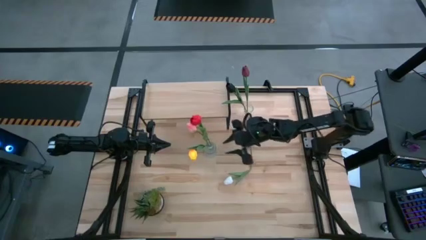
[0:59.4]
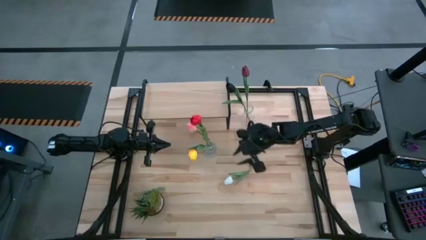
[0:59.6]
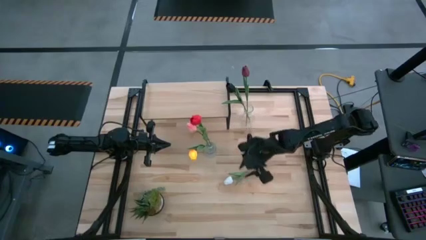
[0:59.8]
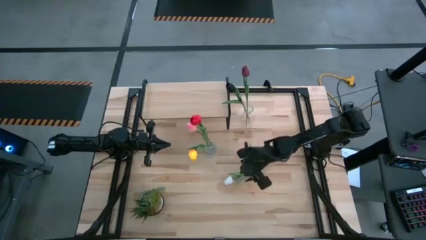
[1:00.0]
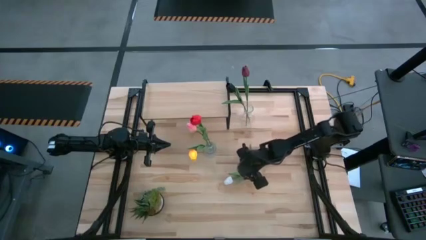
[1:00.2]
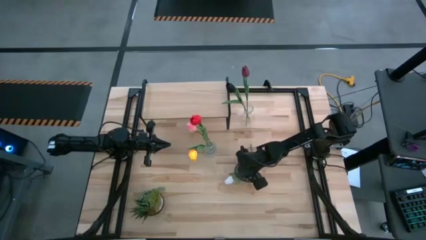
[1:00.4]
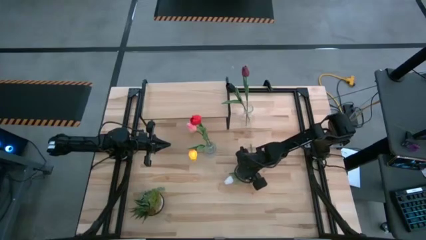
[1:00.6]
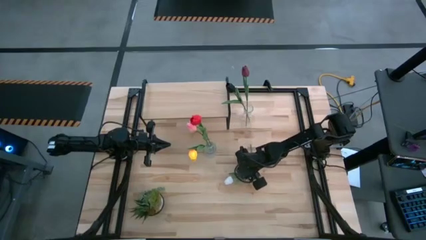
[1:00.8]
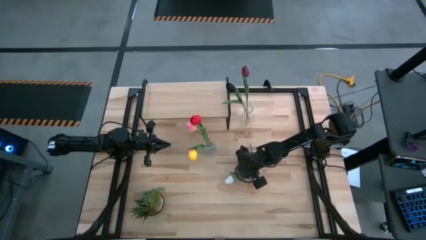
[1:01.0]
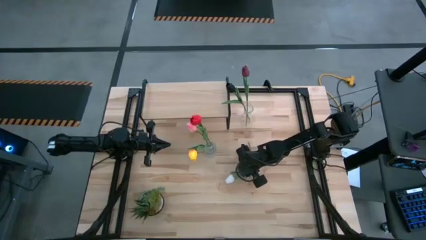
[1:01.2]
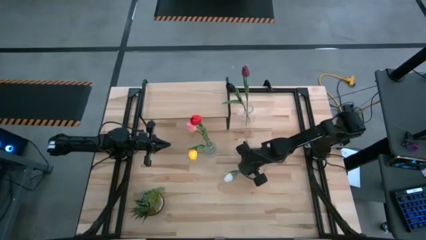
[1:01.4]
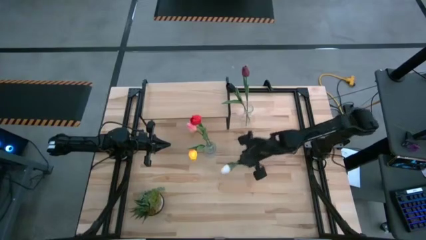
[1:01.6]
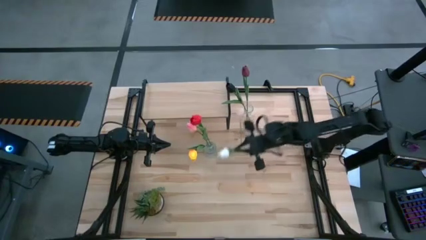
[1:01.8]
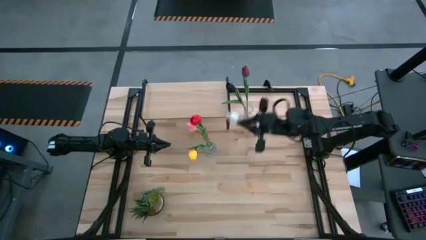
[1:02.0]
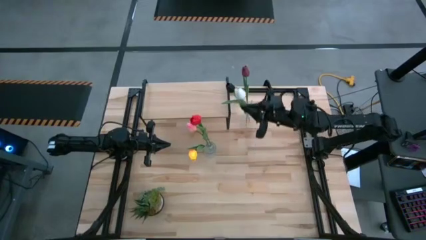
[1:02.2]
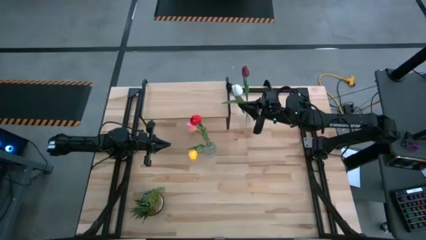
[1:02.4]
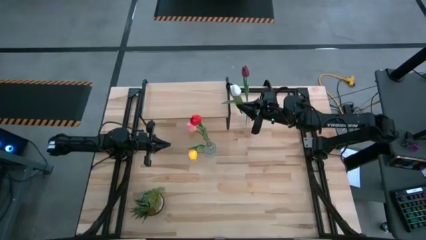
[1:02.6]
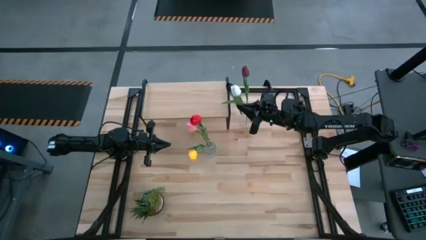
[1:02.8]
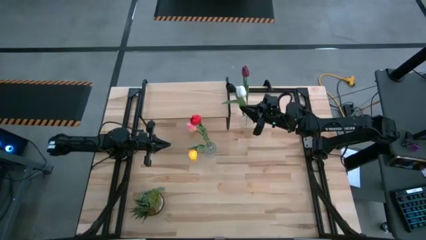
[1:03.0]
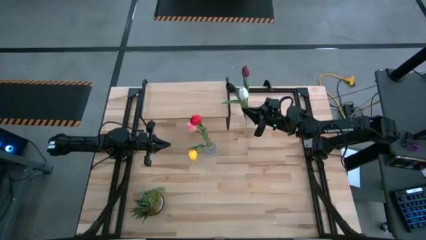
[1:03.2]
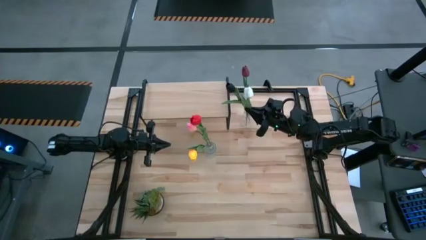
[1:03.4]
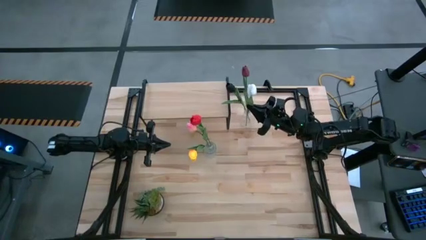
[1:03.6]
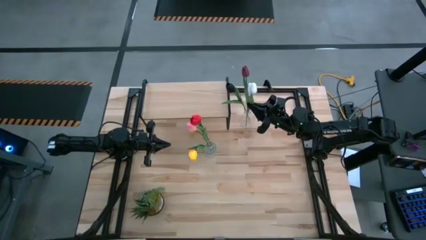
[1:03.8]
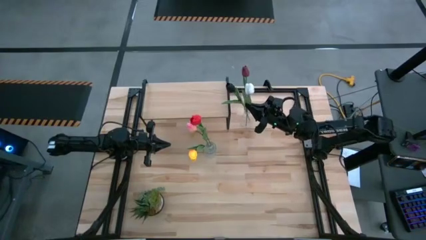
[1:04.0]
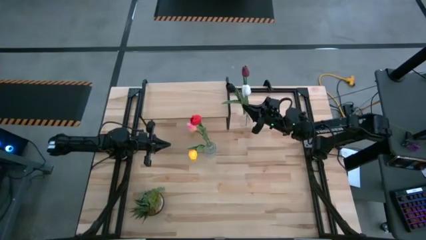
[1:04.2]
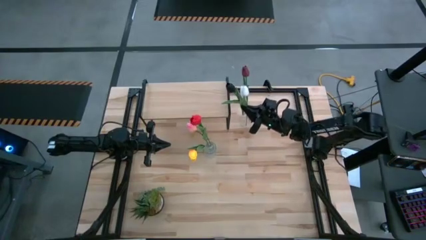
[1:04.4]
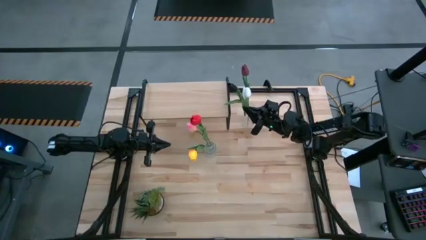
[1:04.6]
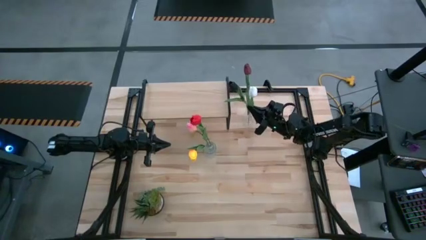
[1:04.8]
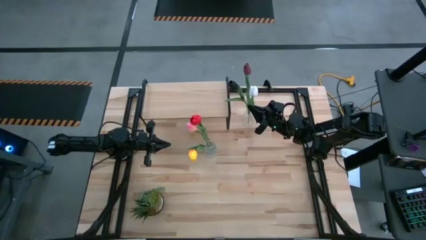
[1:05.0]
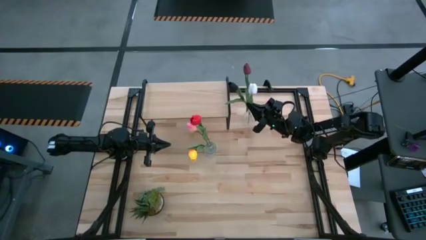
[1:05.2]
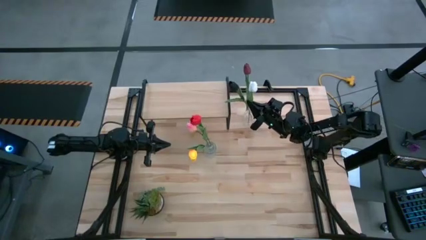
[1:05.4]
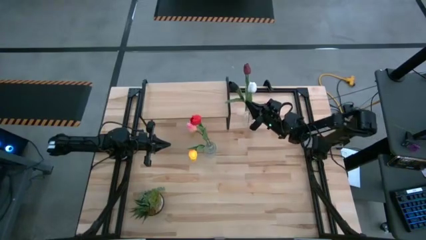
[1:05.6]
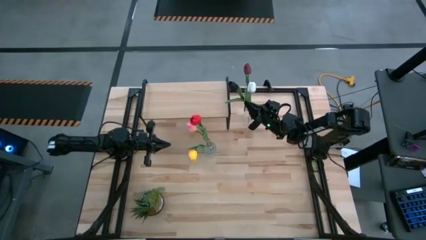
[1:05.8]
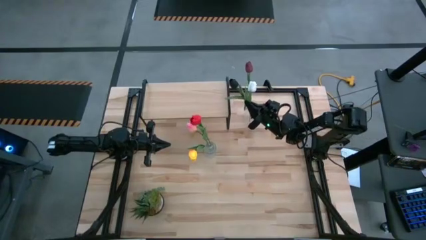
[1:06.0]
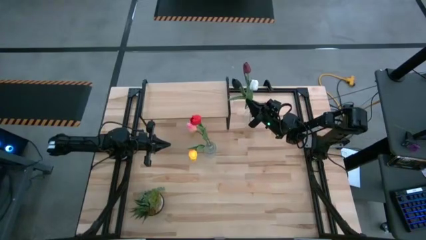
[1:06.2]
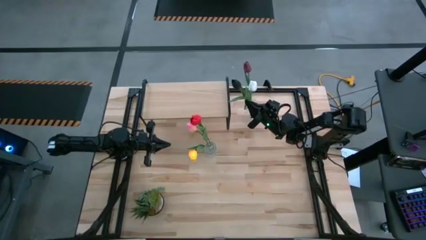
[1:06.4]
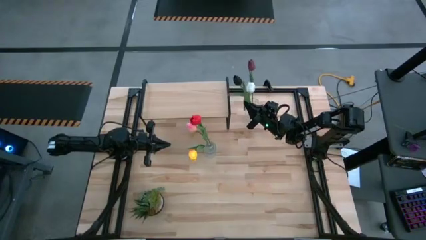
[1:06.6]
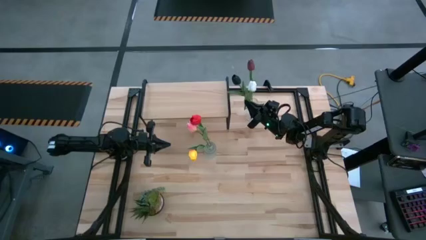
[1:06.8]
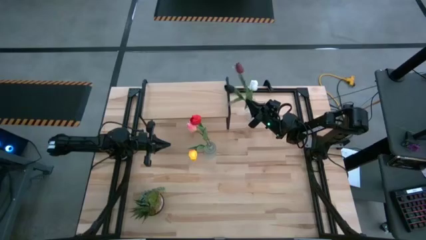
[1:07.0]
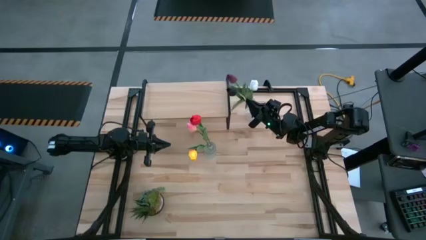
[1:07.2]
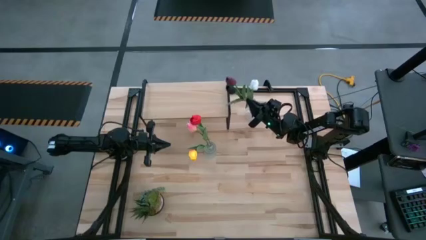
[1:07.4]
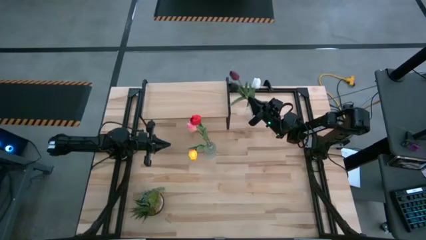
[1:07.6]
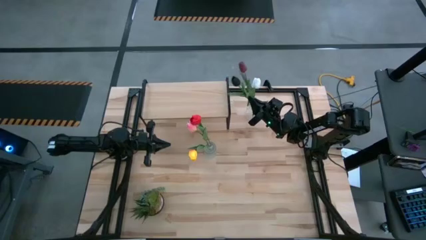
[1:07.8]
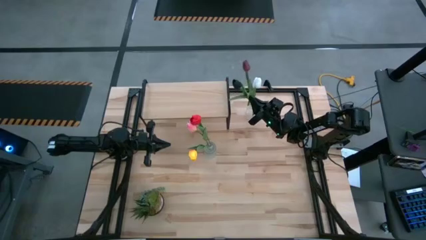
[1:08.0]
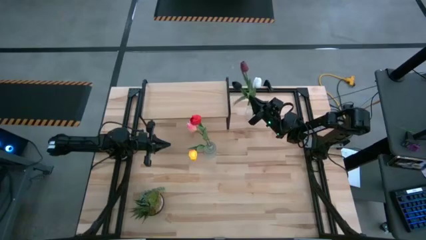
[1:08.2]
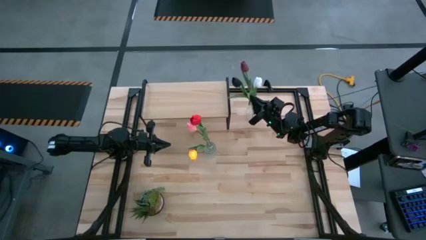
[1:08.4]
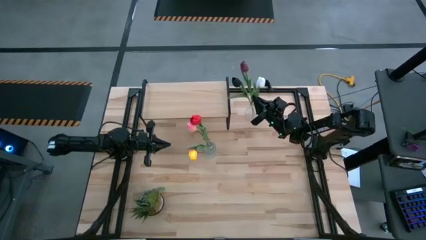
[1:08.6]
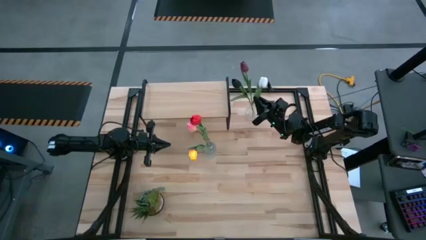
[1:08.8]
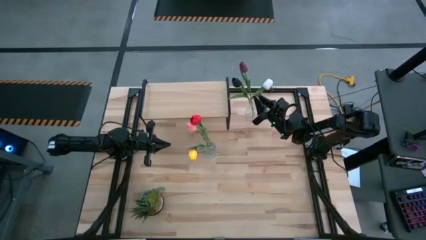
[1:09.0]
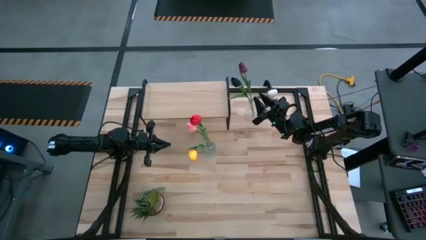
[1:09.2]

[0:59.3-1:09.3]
Task: Pick and place flowers into a vace then onto a shelf
Put the white tulip into the top transparent vase

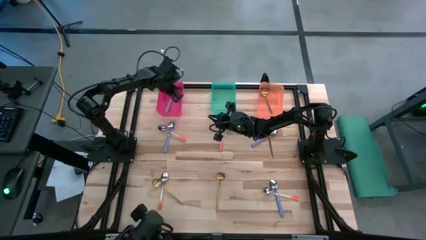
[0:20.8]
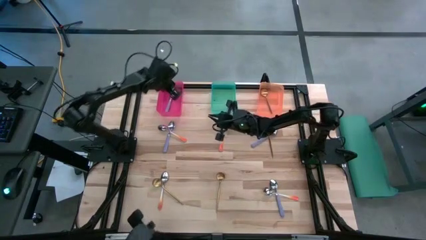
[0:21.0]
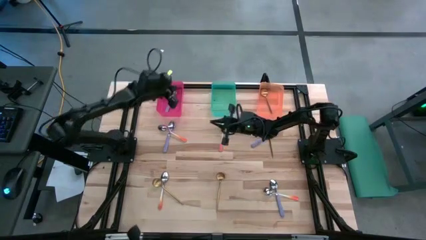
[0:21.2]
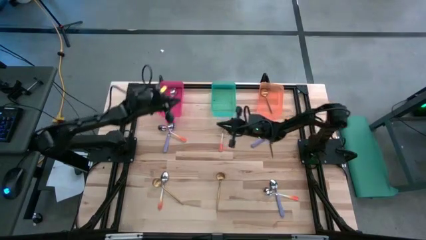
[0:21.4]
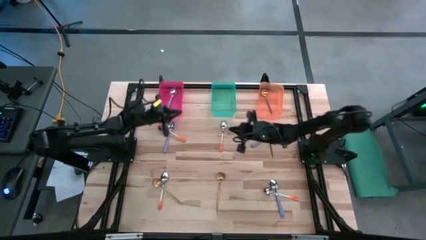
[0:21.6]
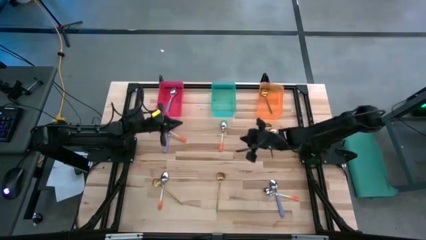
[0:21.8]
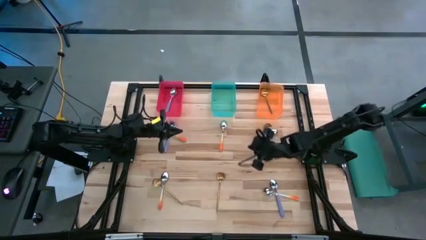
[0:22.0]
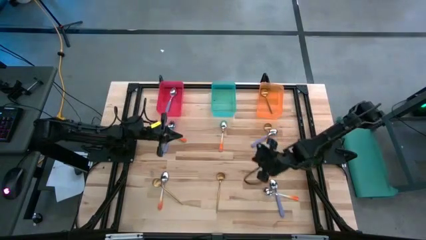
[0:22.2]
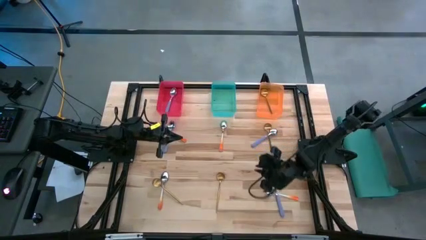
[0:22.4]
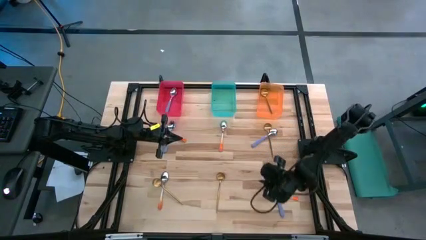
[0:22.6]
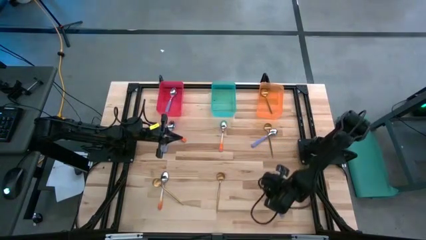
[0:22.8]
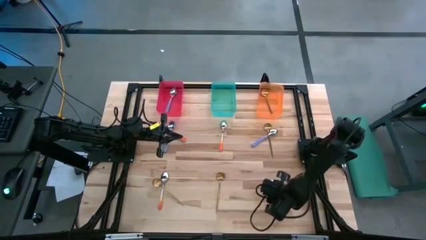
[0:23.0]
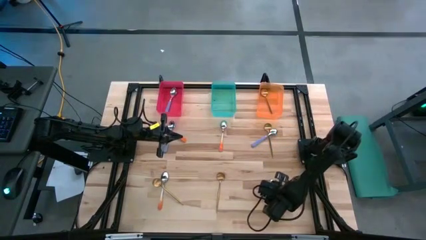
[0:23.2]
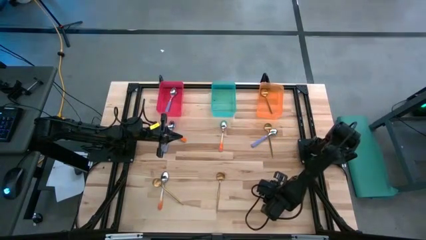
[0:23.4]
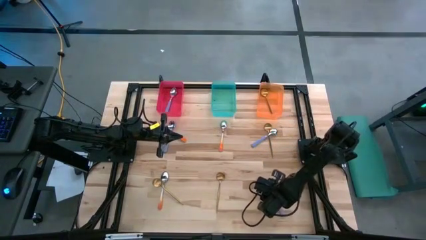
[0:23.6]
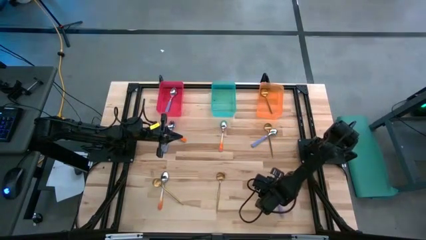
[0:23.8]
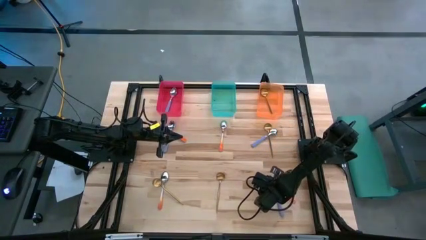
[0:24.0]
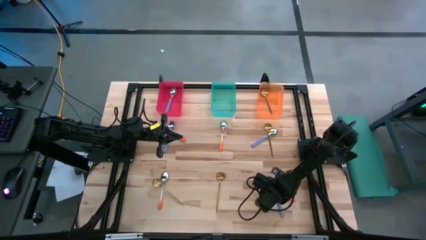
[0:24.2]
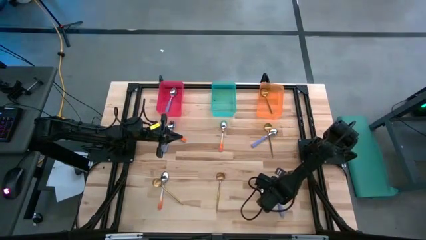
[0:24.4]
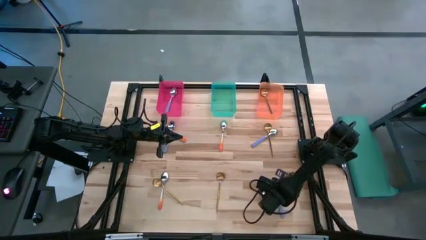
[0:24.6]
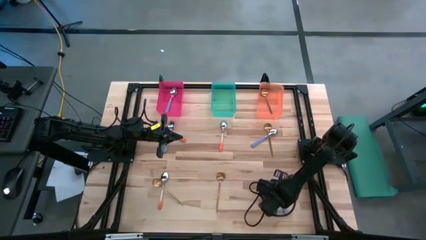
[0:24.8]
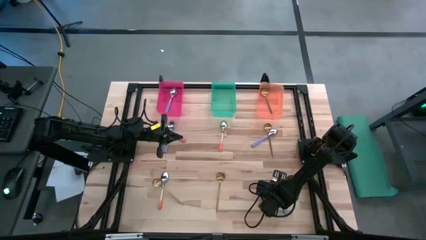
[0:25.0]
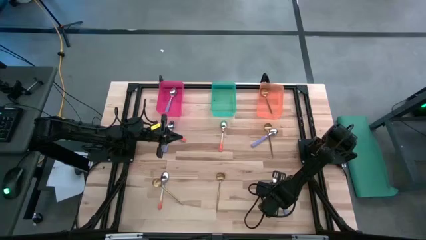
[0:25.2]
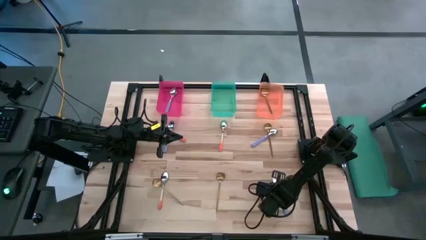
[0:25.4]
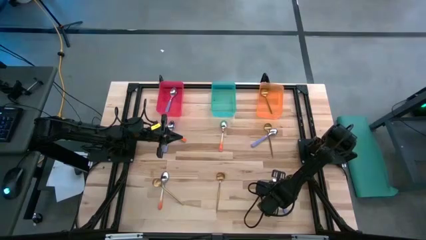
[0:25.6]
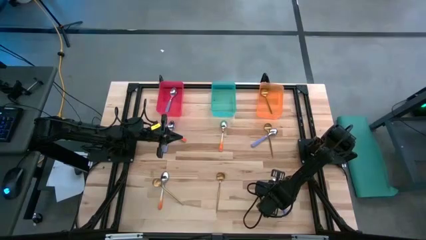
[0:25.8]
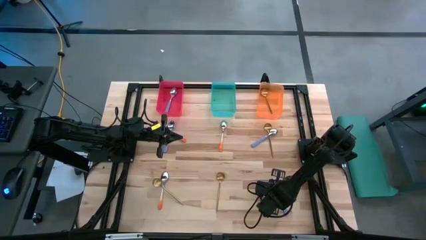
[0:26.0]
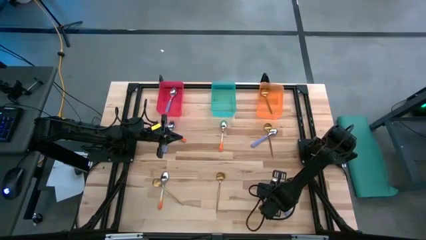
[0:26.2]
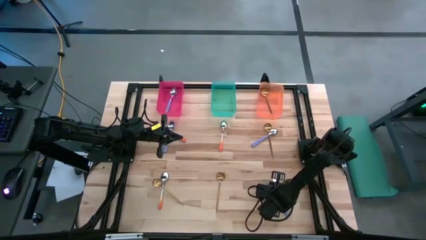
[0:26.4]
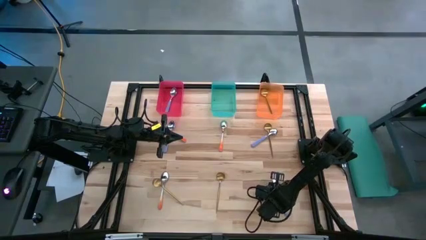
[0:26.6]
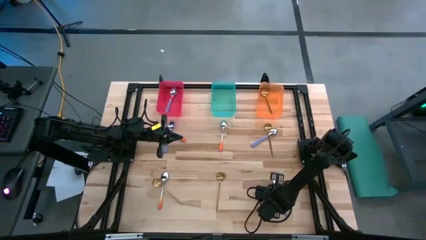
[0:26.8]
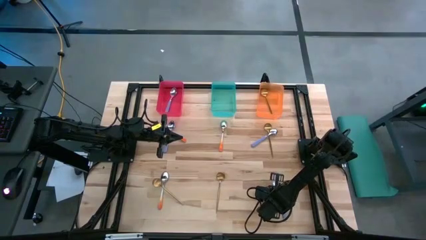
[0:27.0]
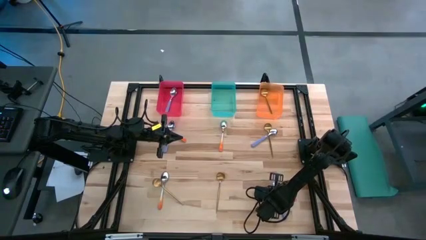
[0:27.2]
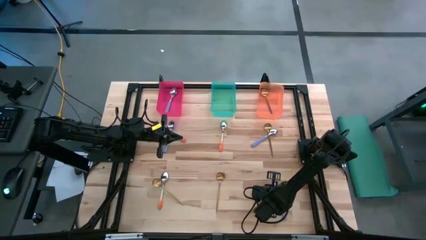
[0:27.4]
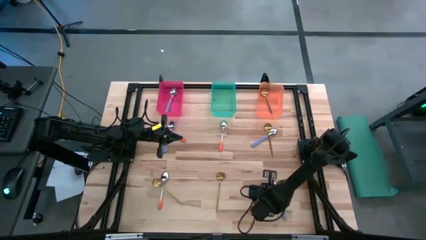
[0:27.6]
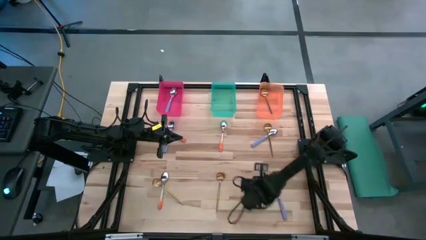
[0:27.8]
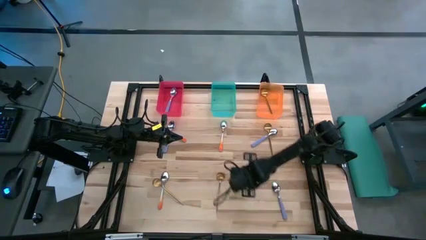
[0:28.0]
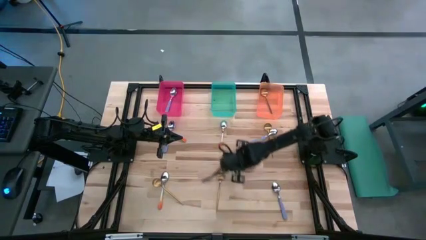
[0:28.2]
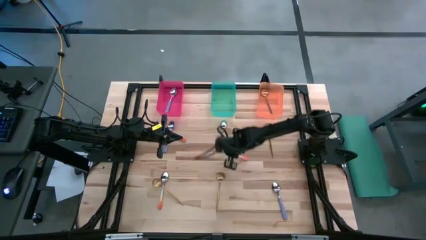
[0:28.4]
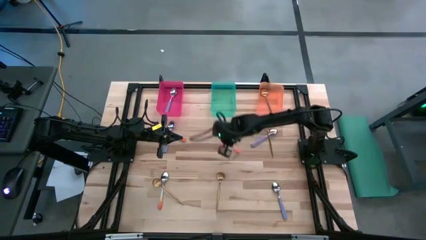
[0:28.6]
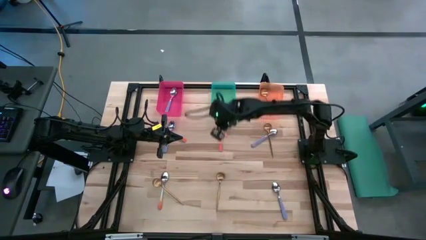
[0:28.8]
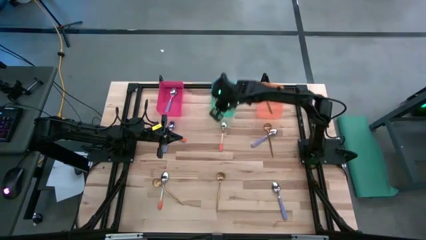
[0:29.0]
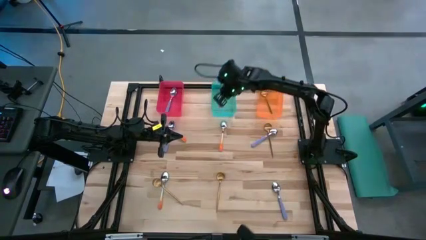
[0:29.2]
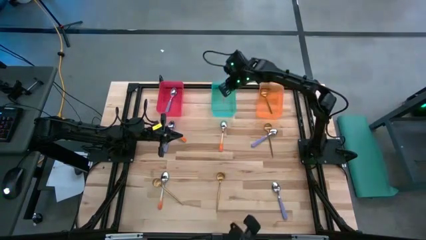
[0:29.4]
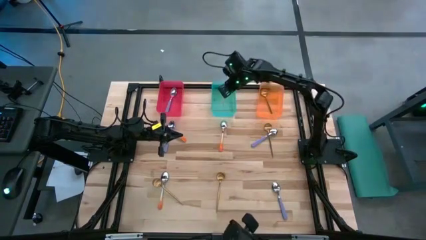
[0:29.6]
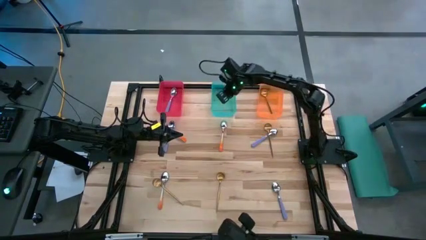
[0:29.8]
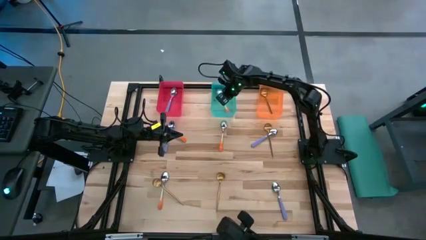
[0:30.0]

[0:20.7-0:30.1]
Task: Sort silverware by color (type)
Put the orange spoon into the green bin
